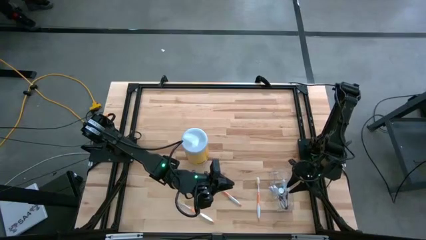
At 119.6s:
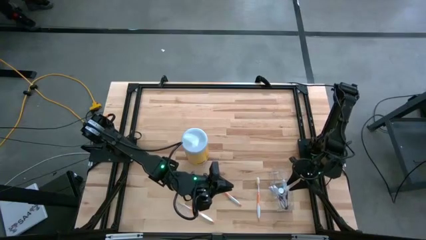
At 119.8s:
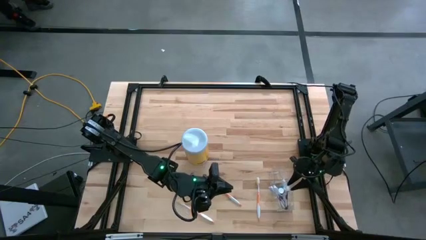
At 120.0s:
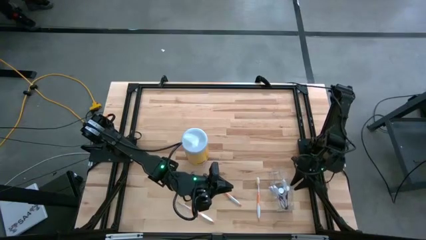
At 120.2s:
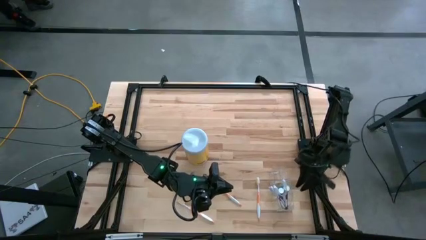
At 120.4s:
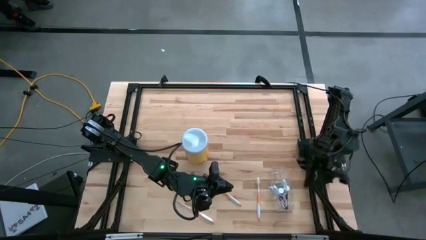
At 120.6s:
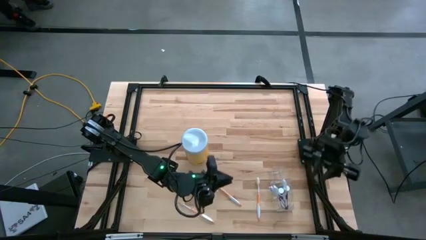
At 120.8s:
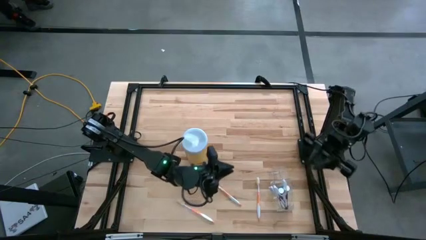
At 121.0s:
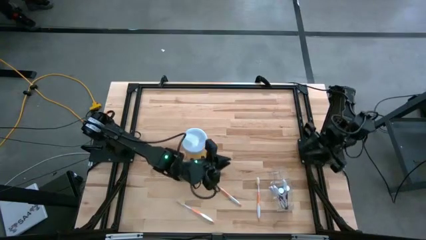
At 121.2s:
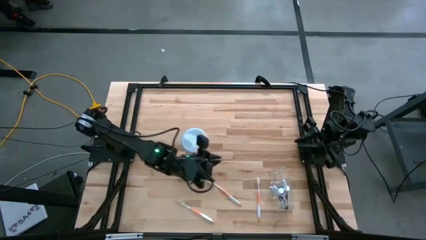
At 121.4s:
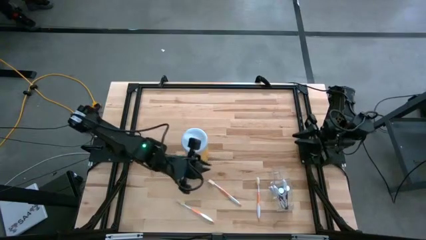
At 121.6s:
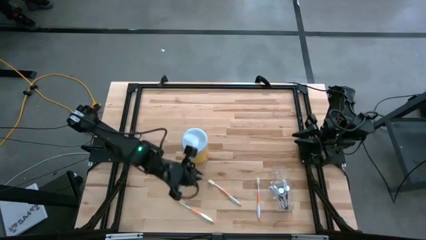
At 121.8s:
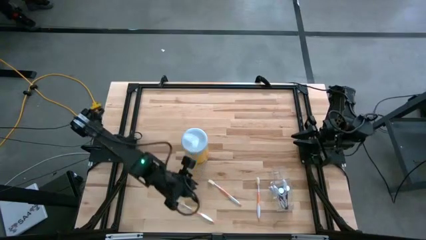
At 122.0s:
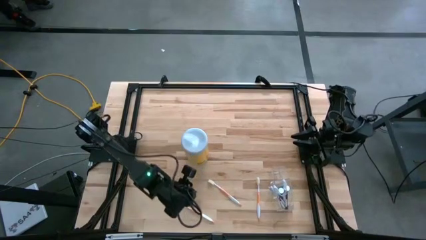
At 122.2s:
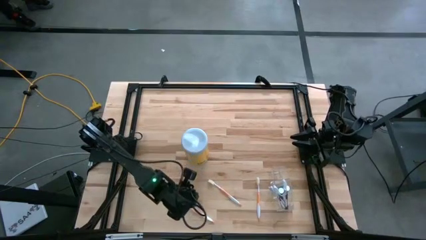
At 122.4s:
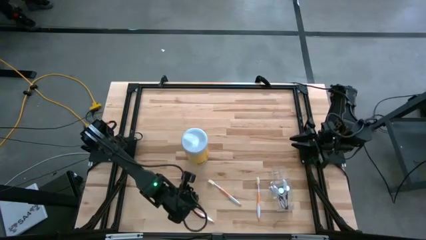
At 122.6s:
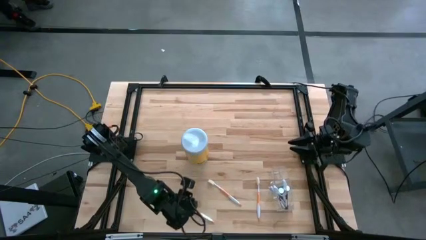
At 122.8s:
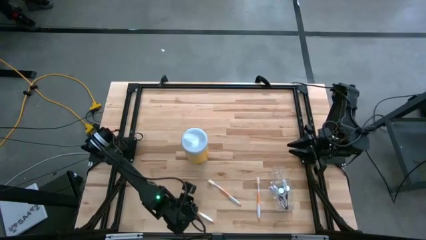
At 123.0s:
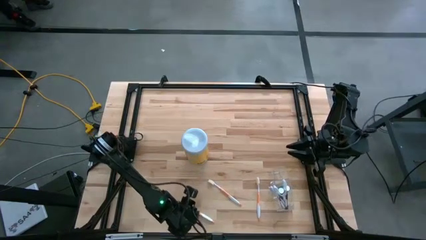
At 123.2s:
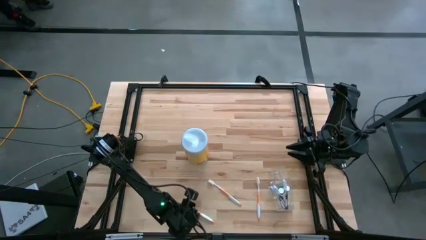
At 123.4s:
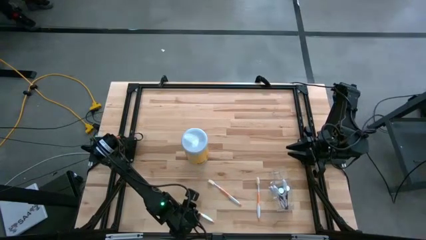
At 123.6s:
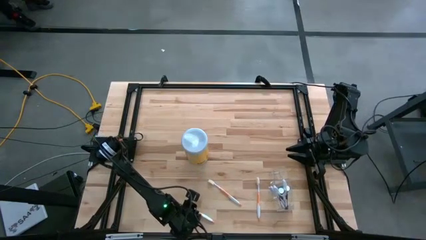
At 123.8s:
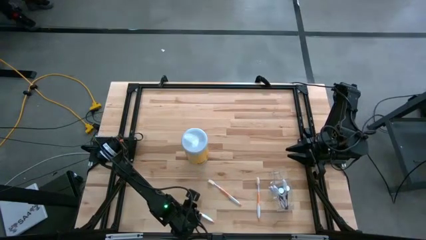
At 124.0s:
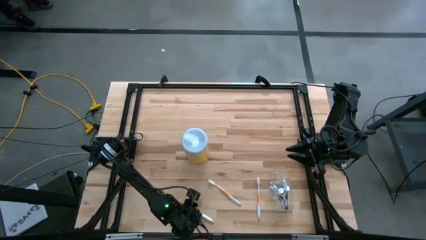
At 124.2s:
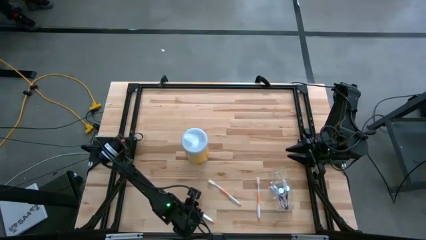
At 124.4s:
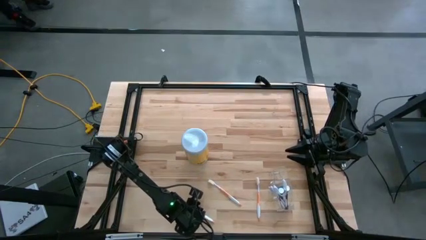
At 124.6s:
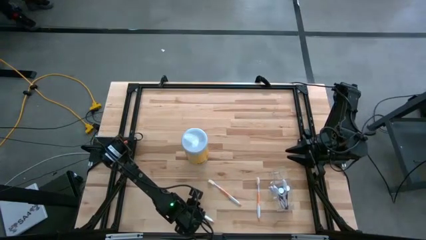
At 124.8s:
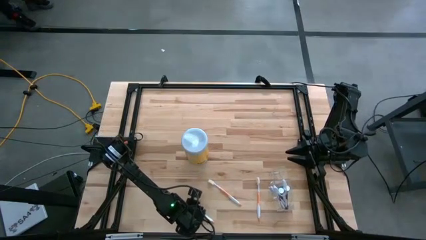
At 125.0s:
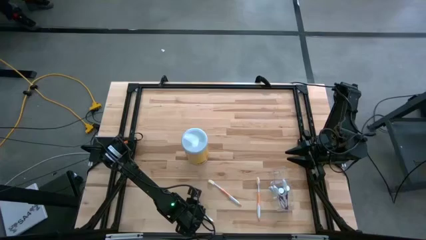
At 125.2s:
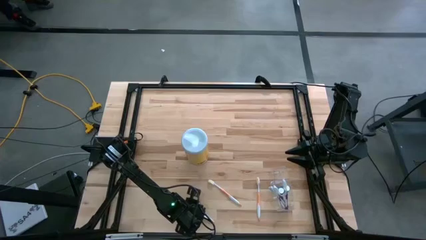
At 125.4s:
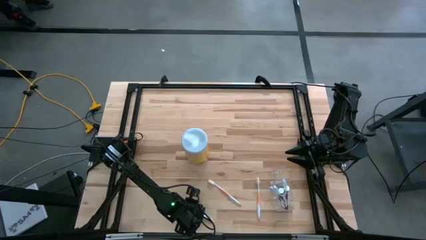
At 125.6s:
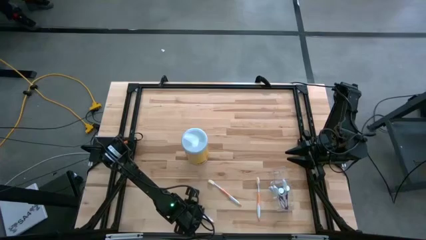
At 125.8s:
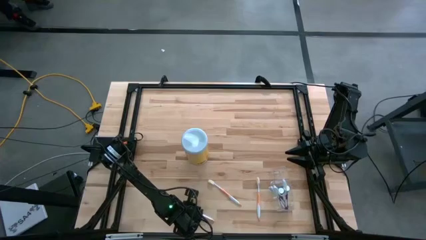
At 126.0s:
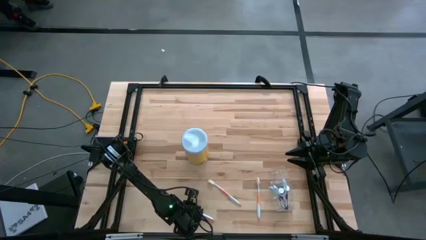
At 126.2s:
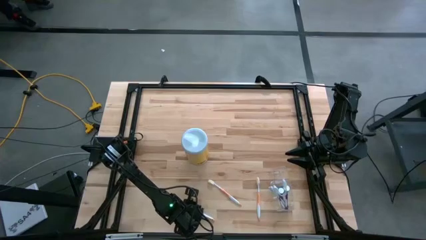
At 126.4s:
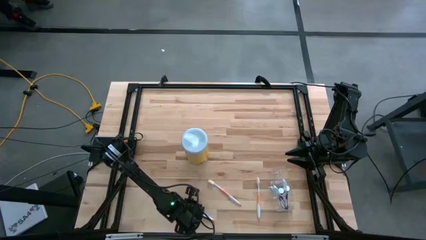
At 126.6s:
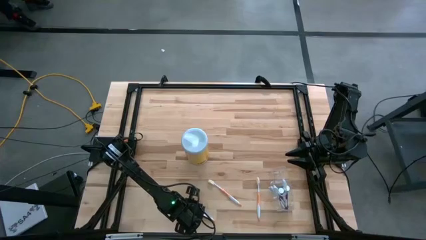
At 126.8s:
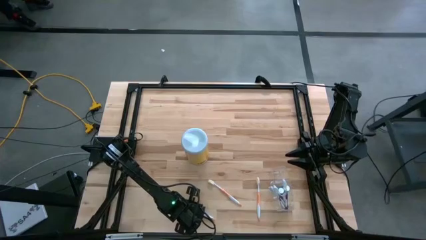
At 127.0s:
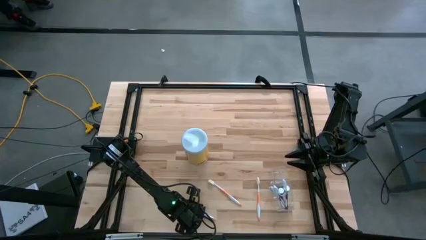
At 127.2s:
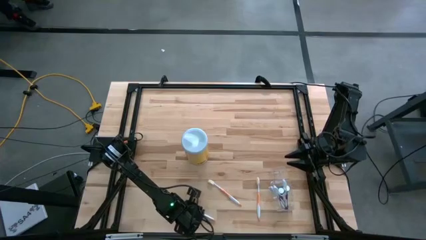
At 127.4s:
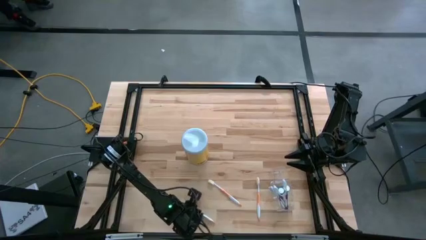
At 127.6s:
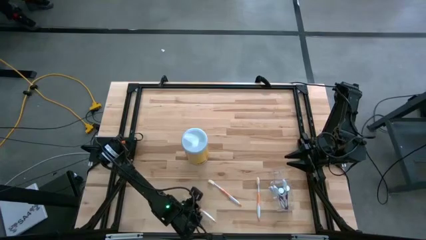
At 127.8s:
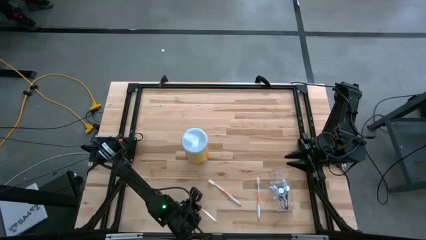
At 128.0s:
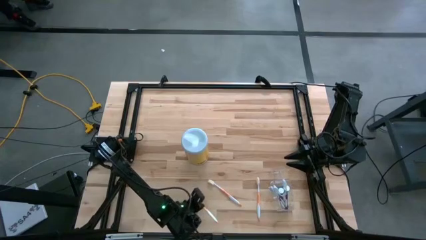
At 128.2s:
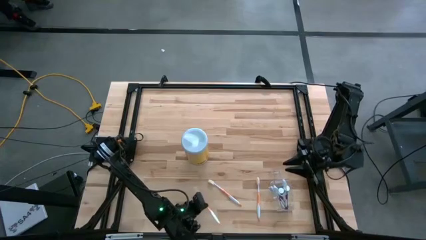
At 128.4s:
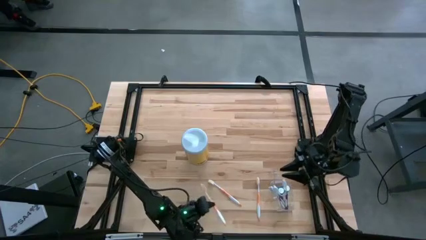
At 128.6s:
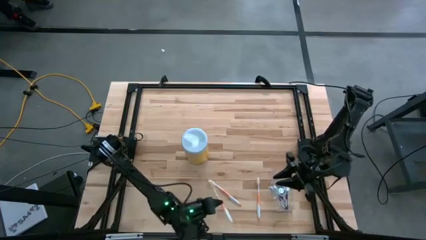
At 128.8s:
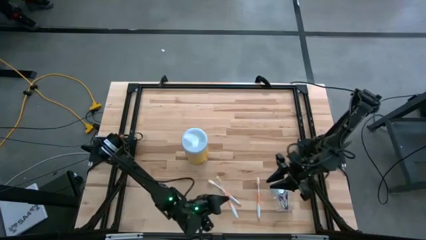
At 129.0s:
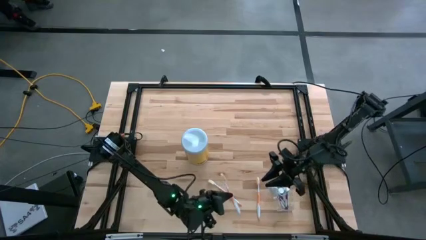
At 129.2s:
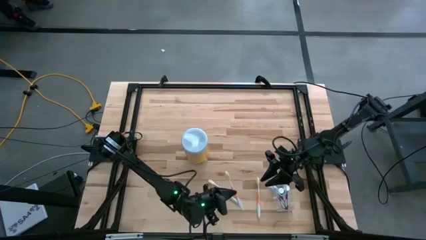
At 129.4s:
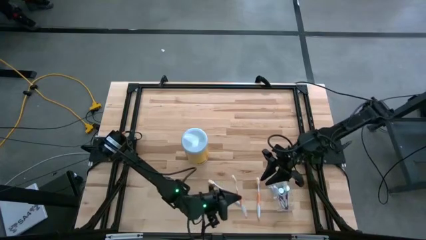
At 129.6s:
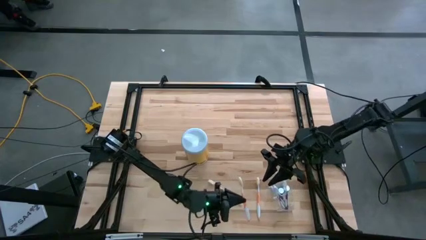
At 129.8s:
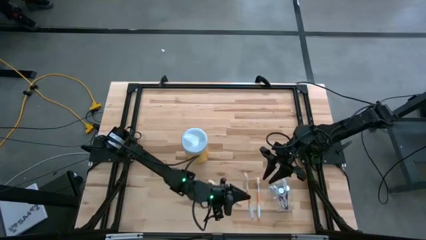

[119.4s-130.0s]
Task: Pick & Place toothbrushing station
Put the left orange toothbrush in the top section of the transparent organizer

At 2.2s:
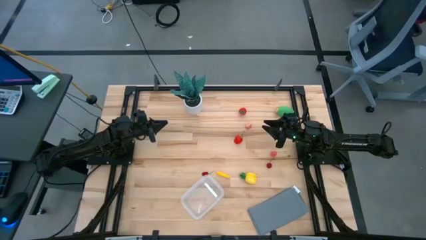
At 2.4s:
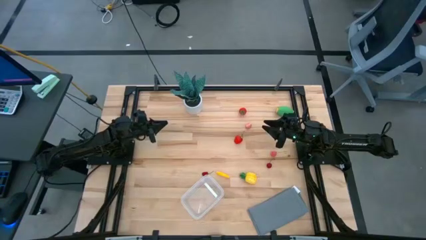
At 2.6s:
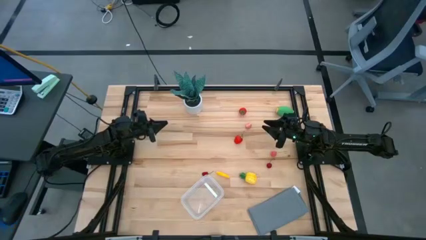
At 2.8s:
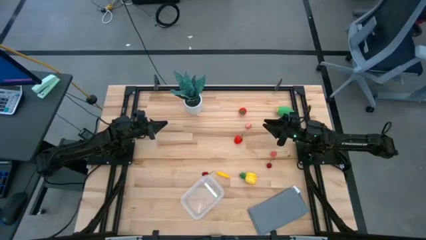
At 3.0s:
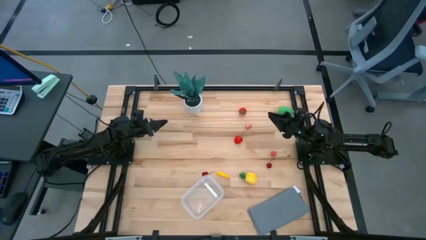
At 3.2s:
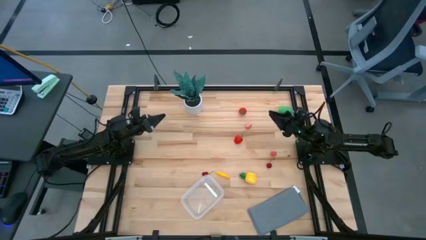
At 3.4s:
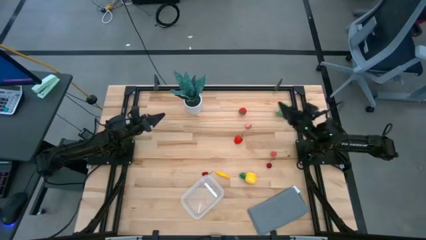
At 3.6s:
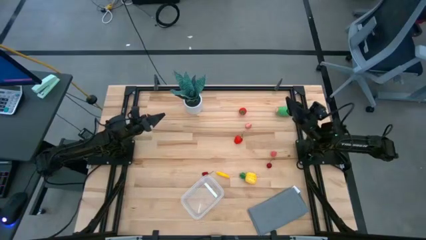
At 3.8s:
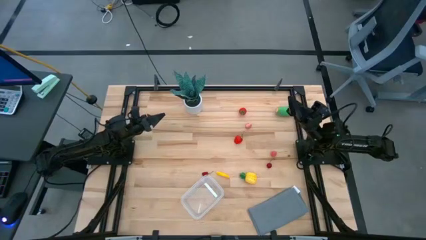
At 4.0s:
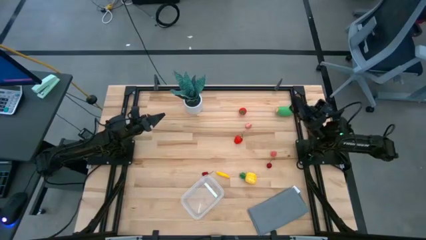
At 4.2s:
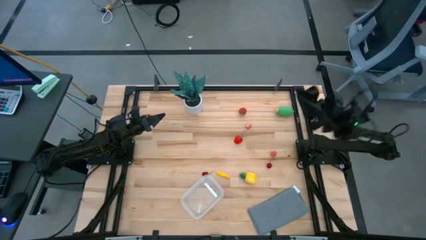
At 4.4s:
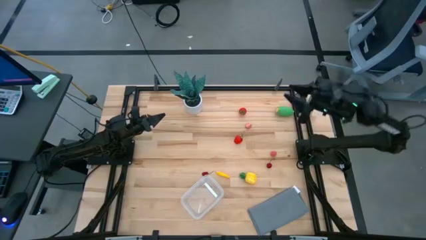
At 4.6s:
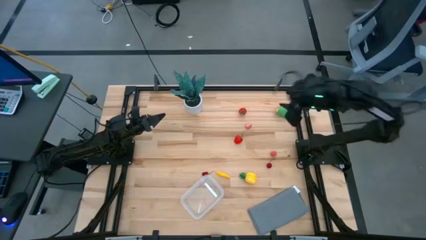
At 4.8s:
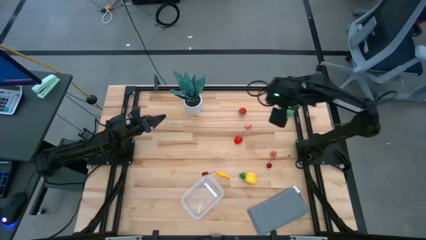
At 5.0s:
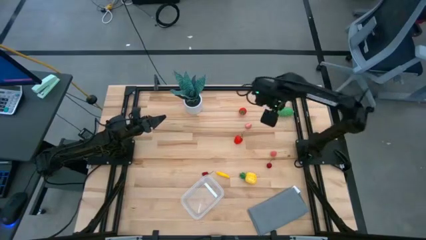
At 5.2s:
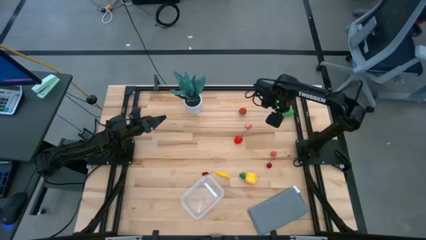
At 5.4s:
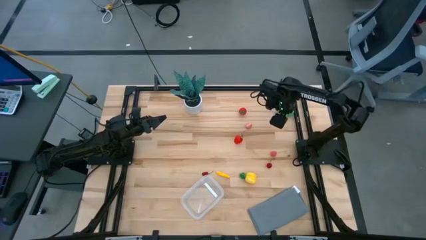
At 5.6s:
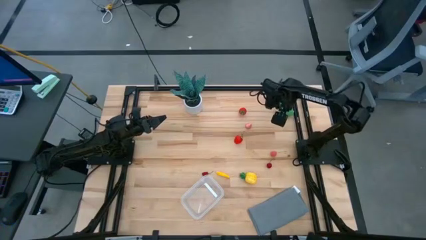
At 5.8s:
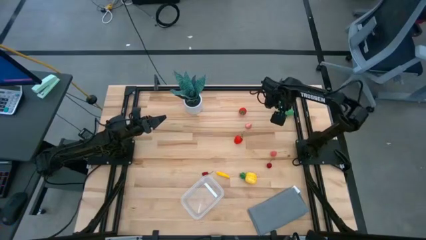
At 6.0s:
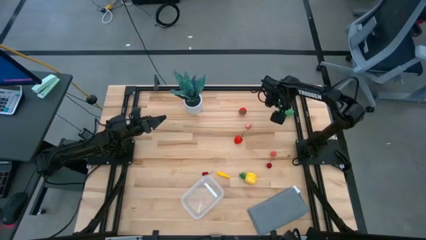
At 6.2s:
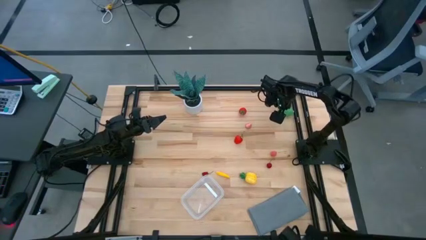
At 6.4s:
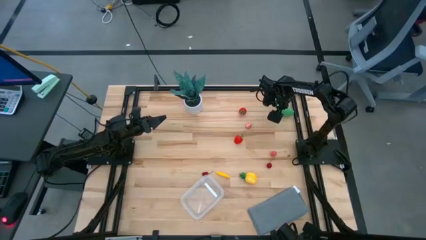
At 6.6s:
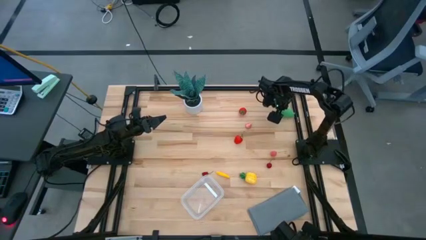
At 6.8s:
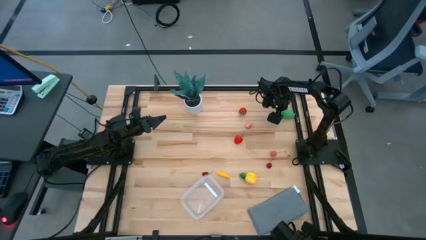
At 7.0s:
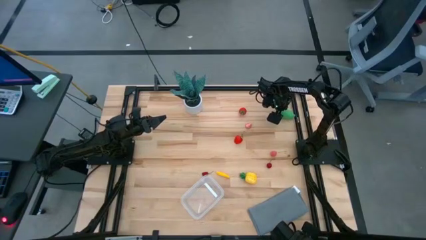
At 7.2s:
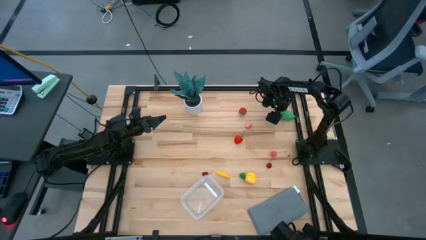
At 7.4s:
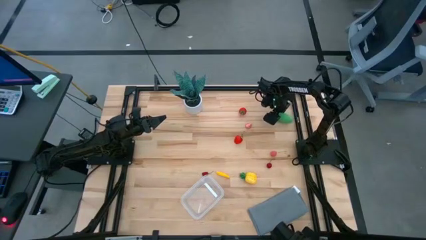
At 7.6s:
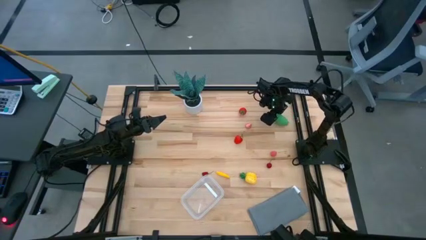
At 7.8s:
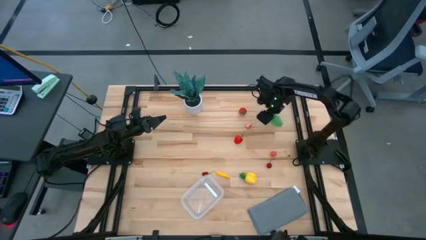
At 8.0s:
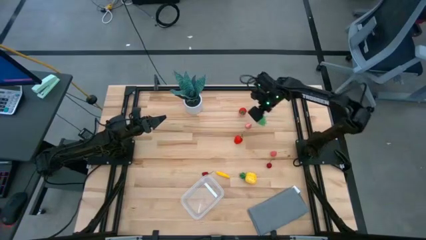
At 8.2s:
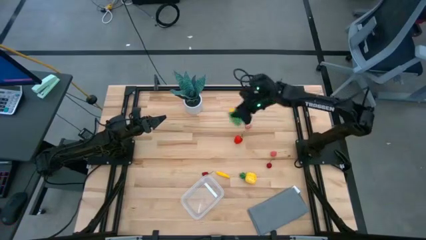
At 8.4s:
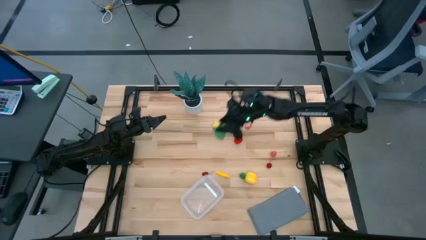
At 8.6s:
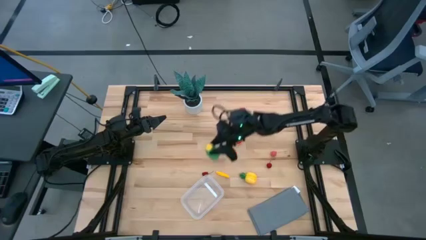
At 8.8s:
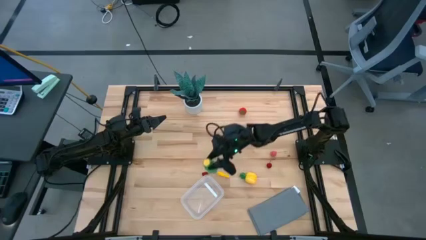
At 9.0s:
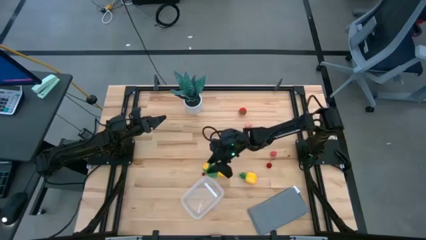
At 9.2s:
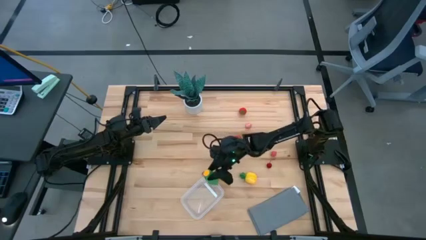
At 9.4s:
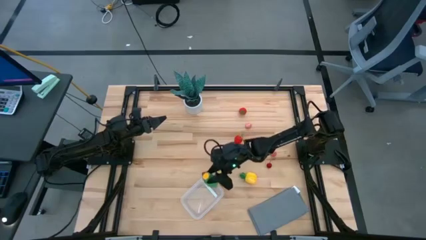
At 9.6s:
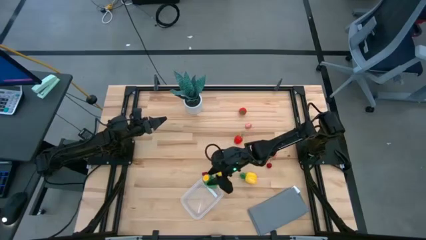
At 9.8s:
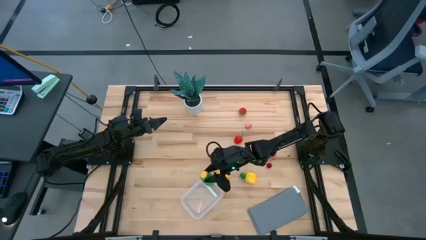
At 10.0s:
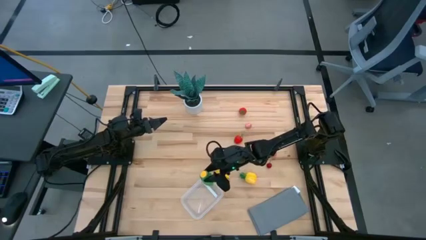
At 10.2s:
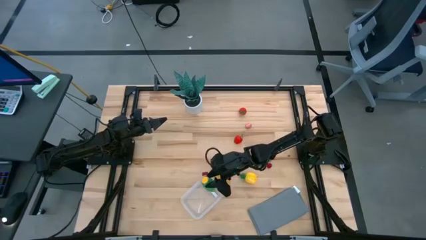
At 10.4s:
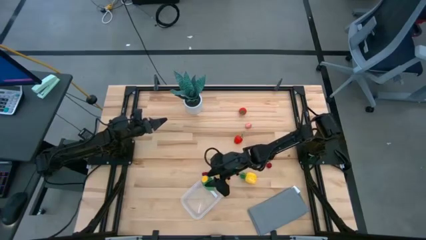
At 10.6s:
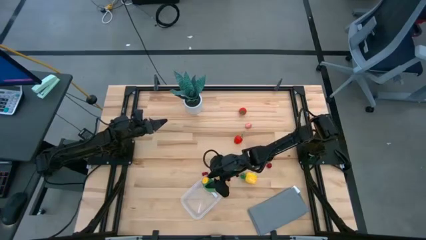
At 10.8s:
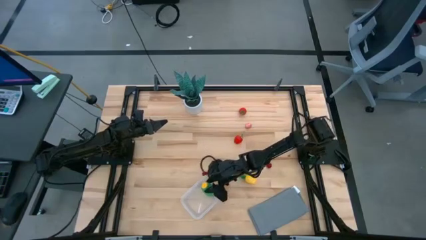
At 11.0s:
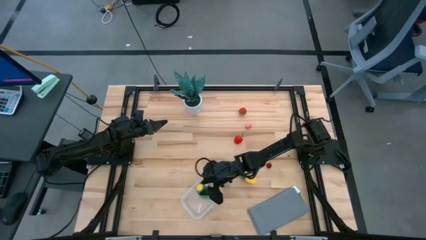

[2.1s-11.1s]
Task: Pick and placing Produce into tupperware
Put the green corn into the transparent bin
